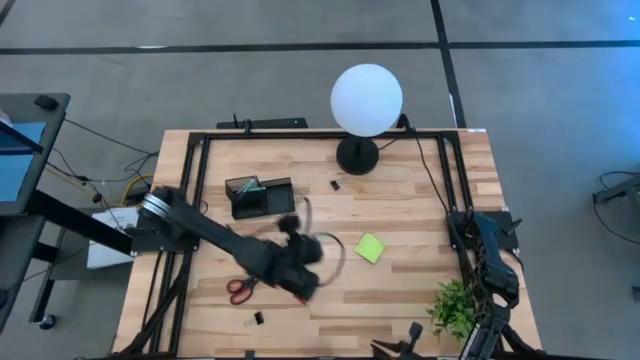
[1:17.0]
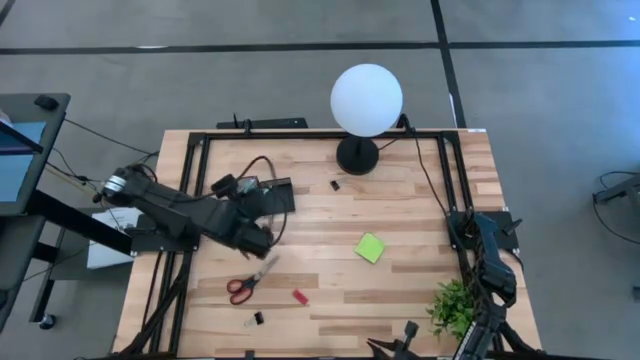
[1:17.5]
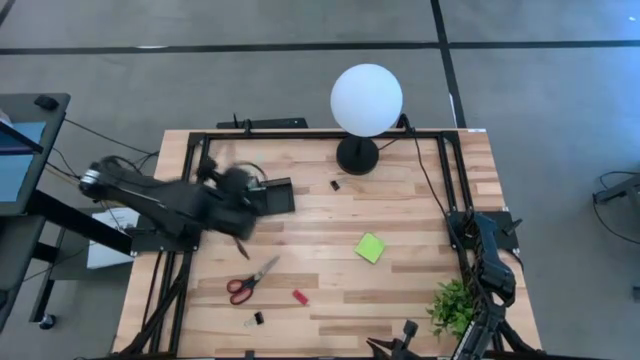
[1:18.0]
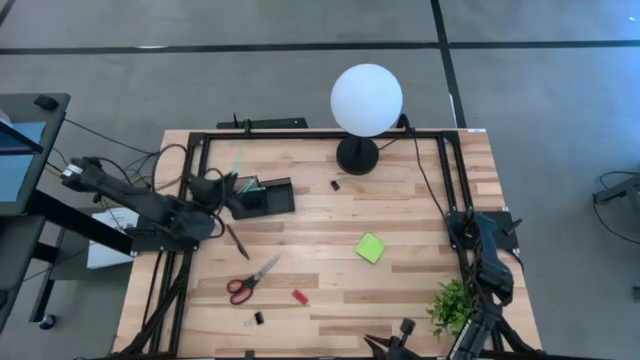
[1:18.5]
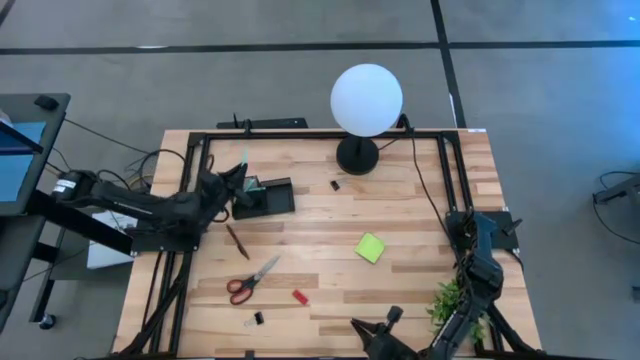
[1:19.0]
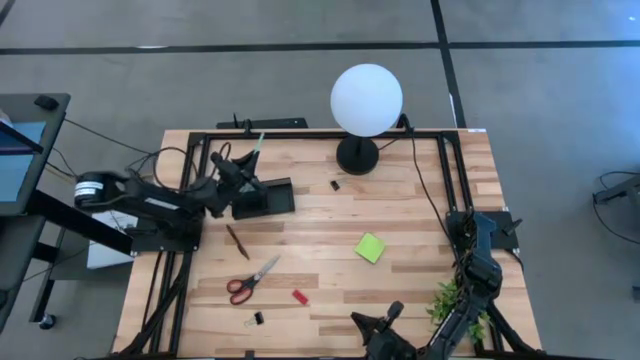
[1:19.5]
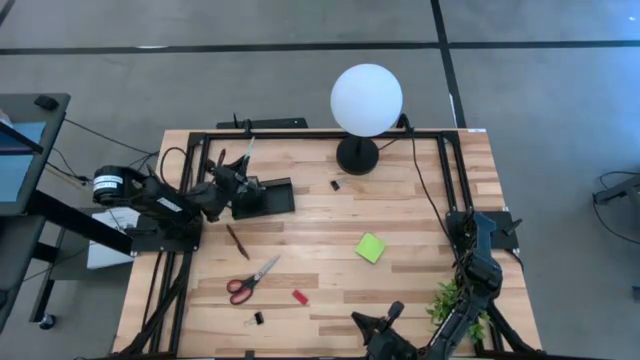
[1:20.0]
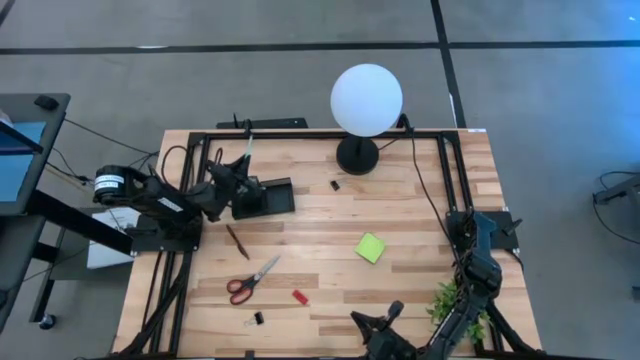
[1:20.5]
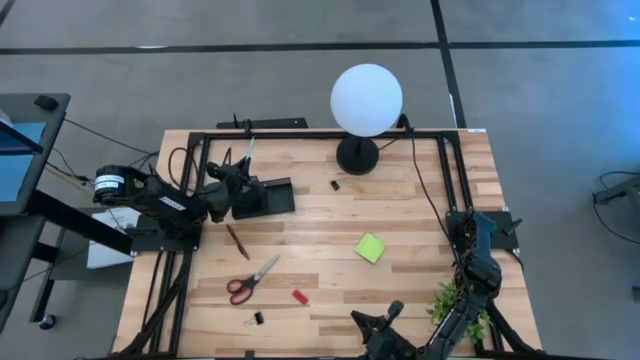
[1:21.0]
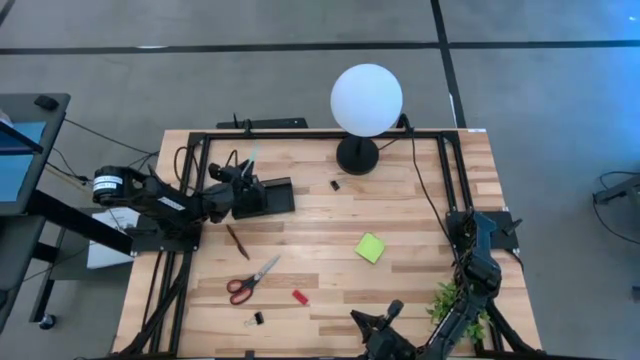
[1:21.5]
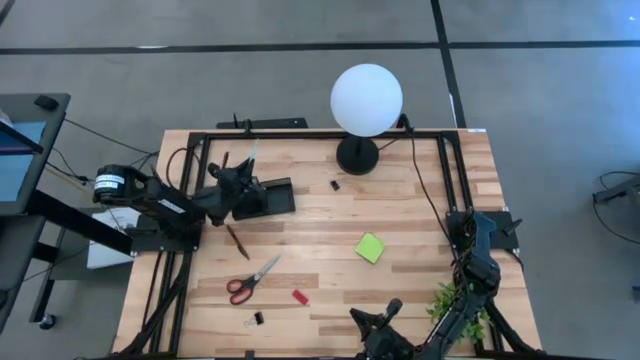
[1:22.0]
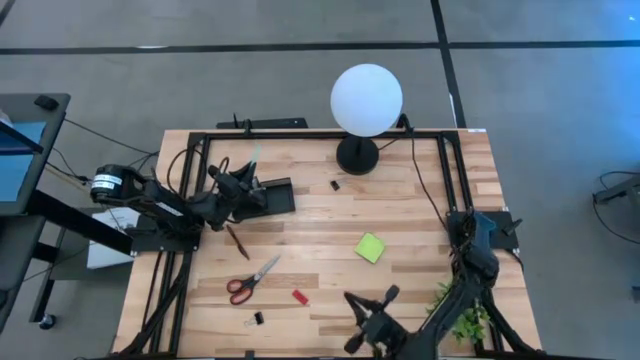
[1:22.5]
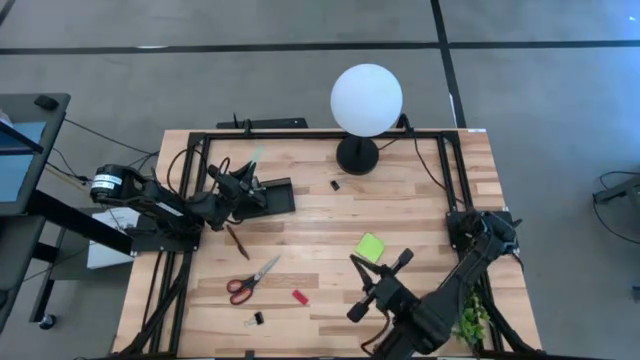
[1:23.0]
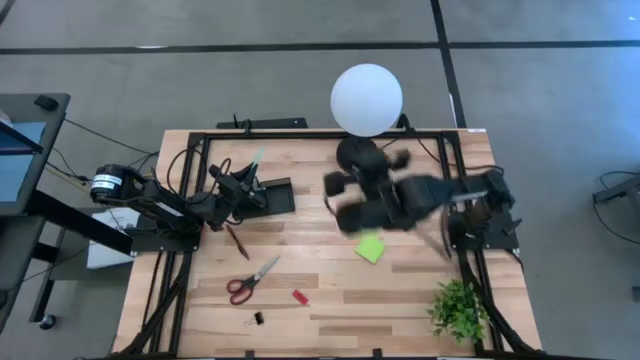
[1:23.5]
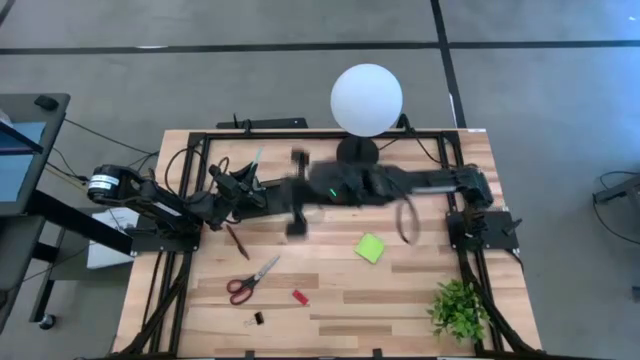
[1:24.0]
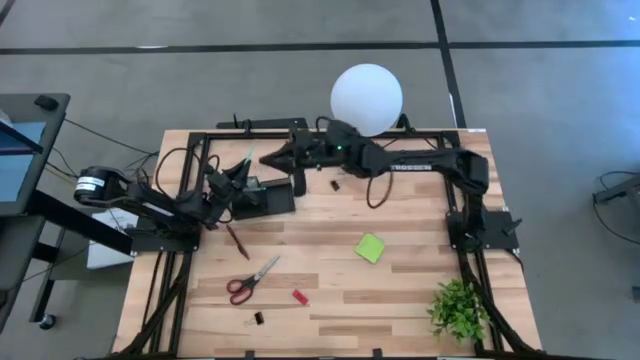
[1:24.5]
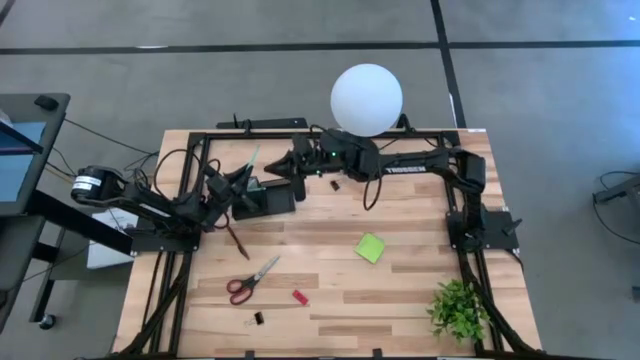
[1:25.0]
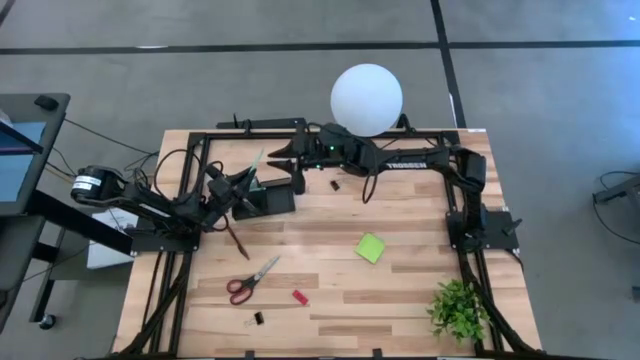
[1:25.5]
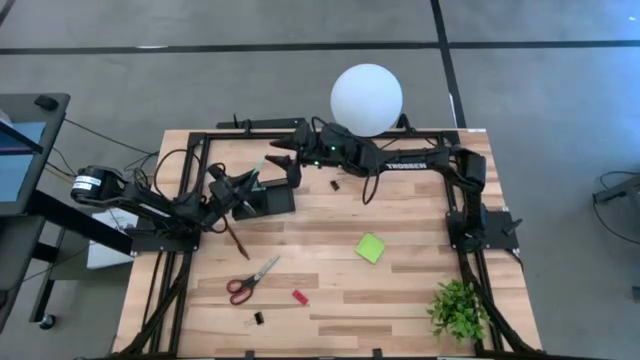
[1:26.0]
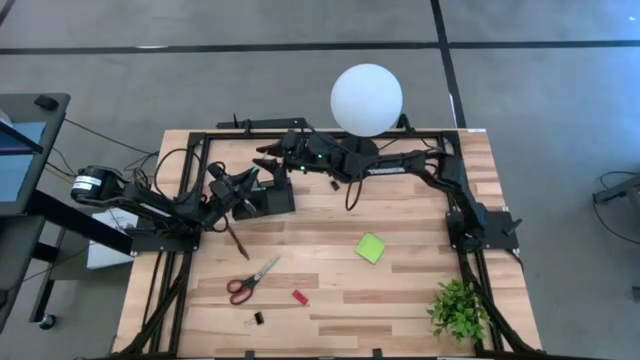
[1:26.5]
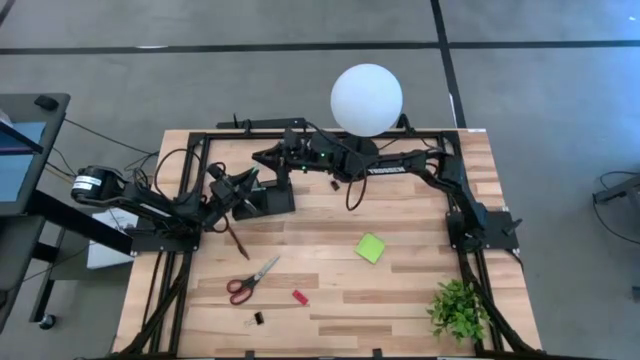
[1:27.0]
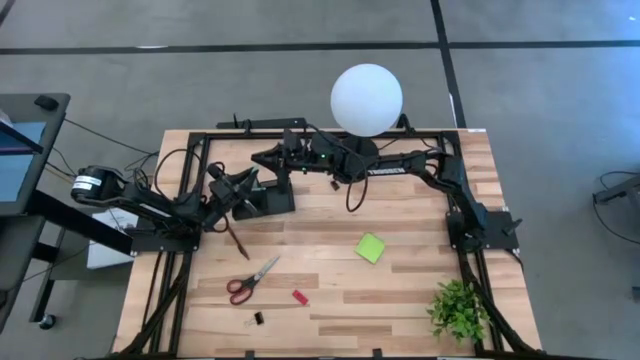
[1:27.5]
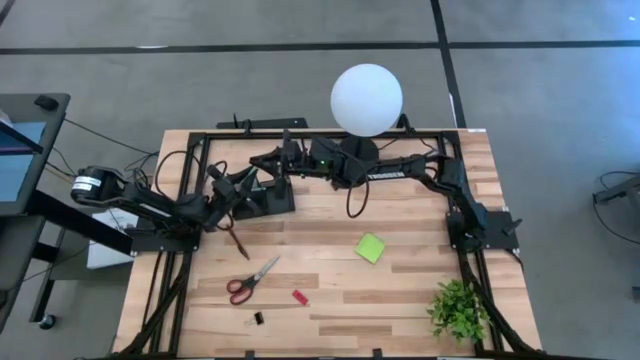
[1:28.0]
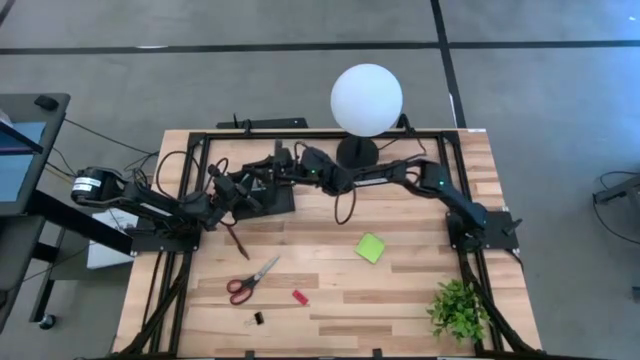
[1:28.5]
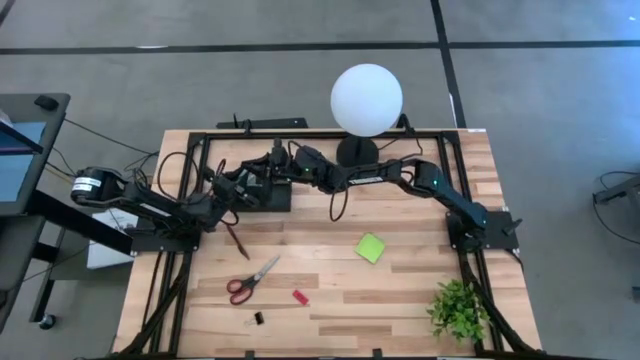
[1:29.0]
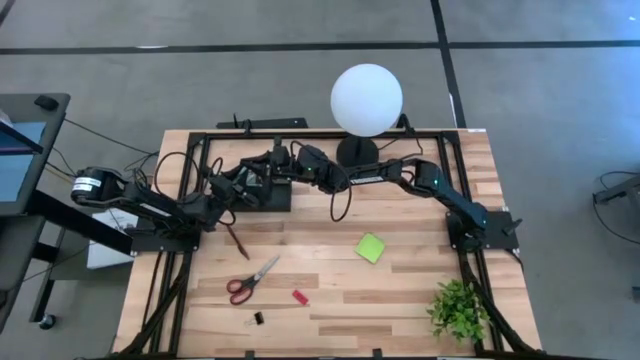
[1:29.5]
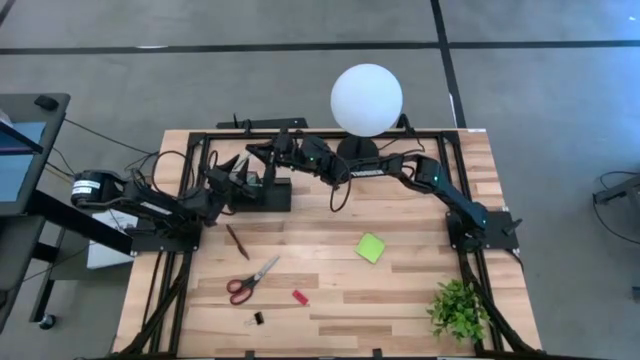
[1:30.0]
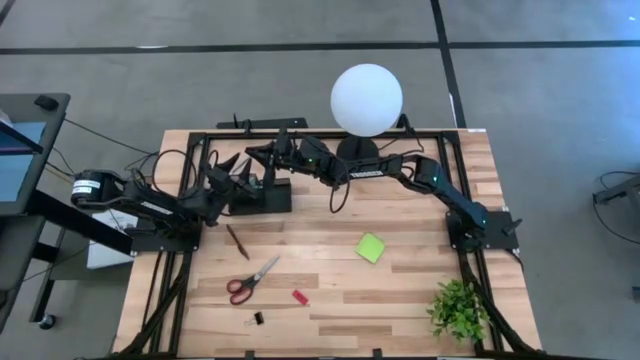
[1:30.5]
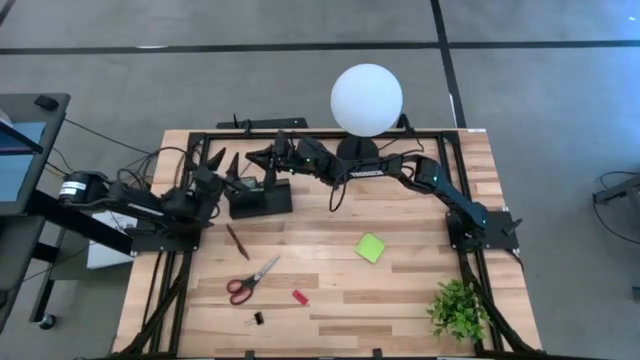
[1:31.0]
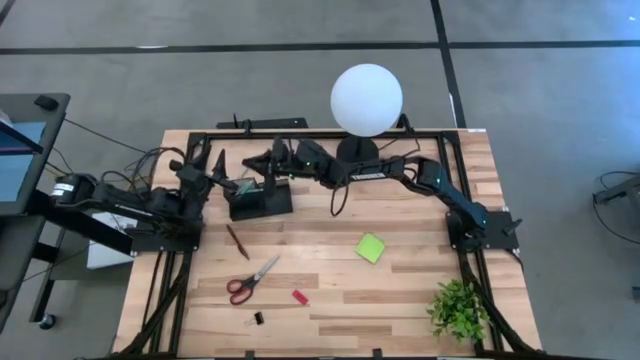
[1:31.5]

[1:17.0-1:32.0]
Task: Pick and place office supplies into organizer
Put the blue pencil into the black desk organizer

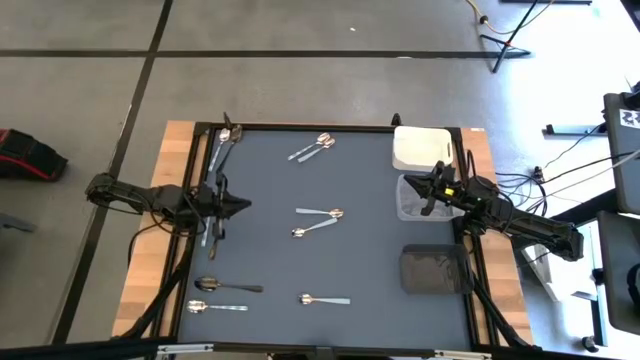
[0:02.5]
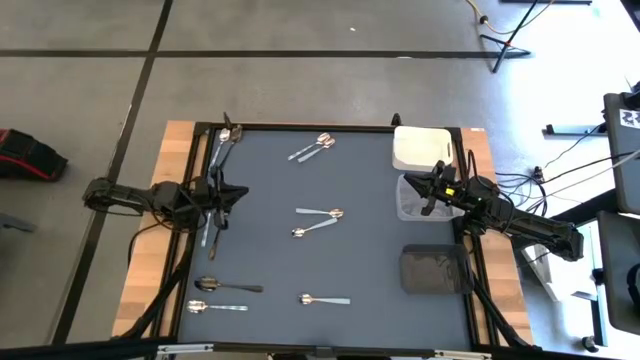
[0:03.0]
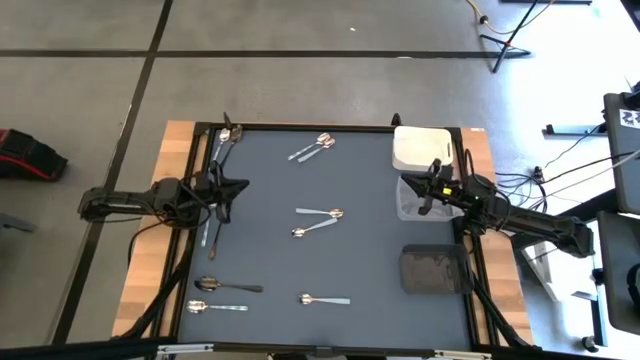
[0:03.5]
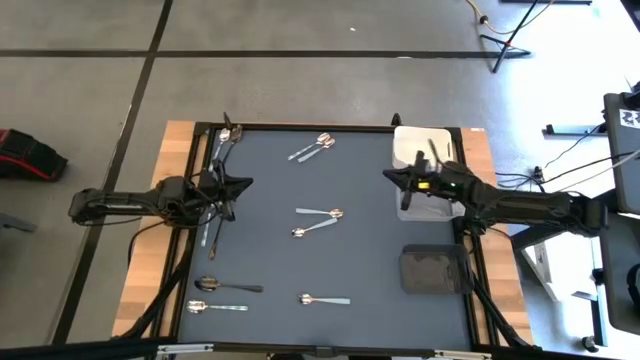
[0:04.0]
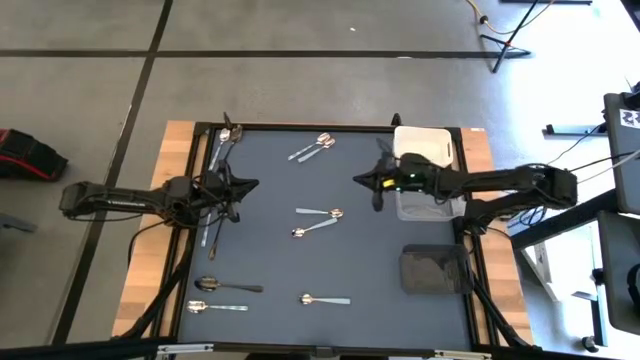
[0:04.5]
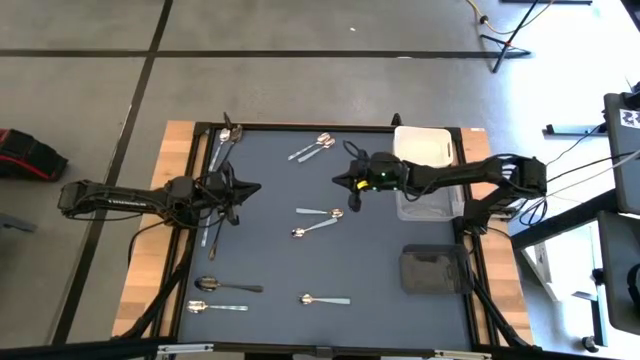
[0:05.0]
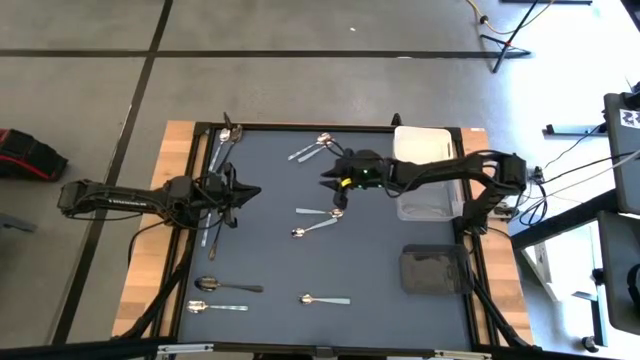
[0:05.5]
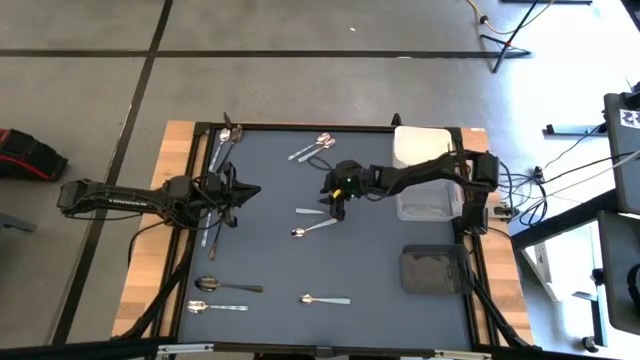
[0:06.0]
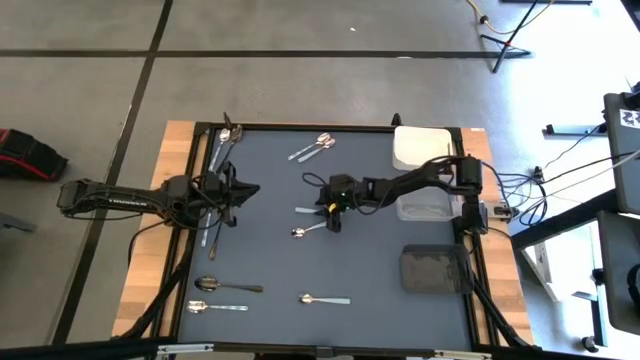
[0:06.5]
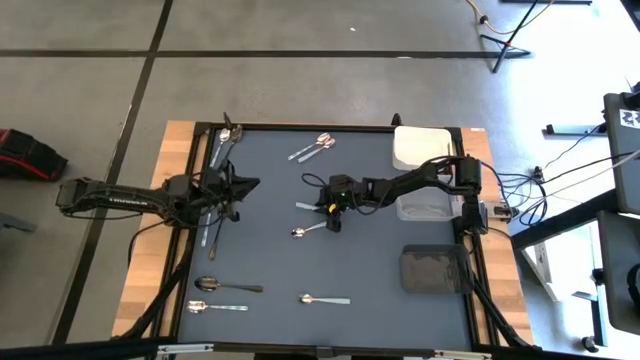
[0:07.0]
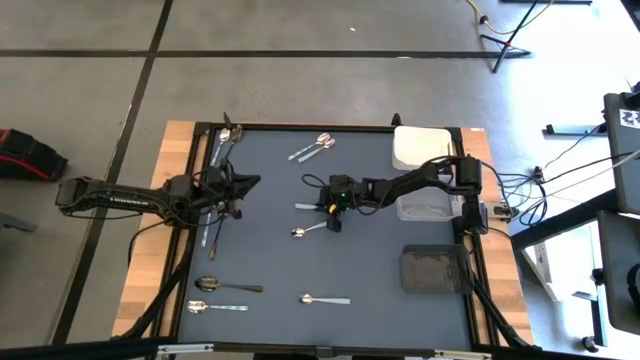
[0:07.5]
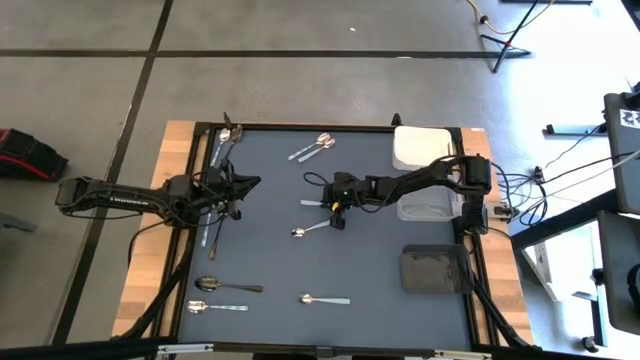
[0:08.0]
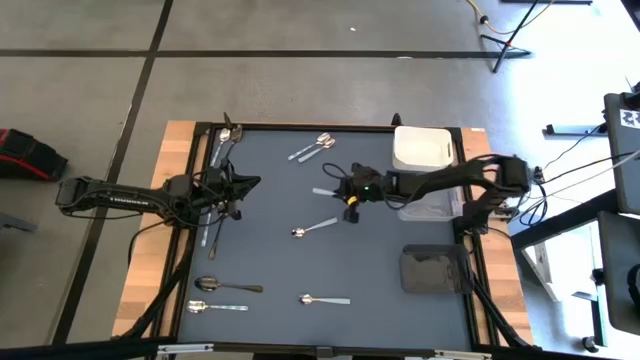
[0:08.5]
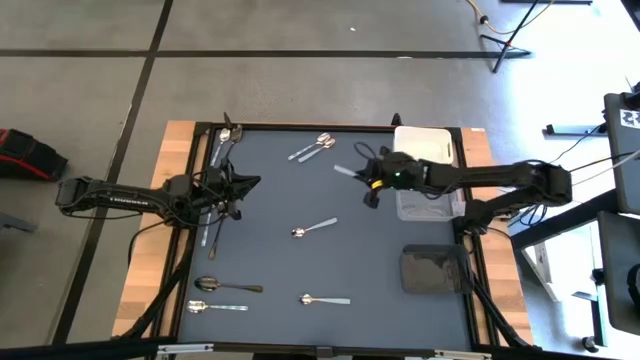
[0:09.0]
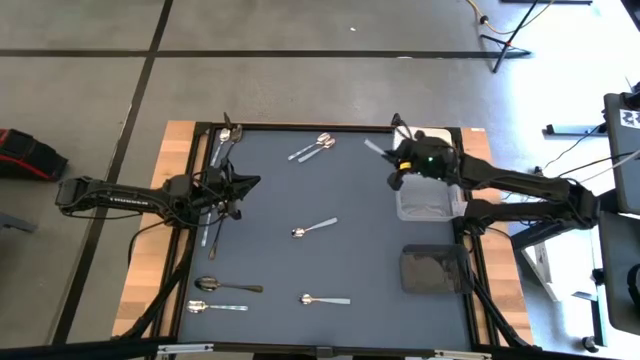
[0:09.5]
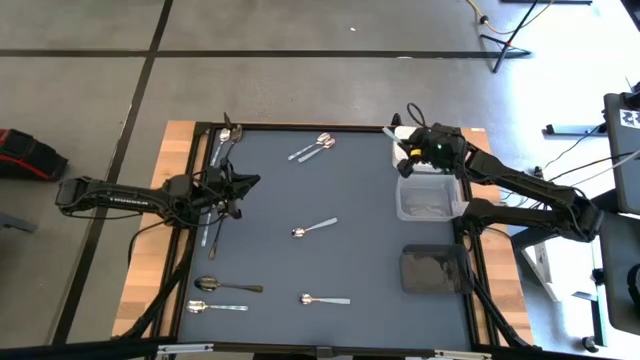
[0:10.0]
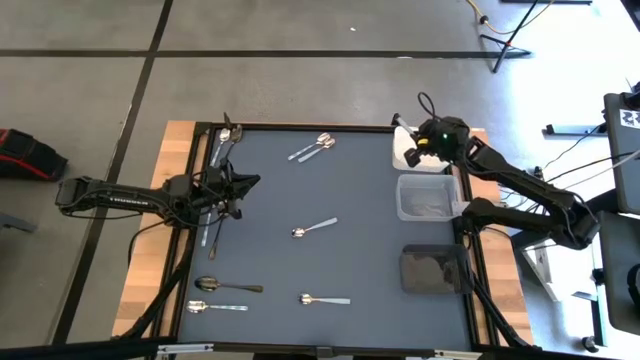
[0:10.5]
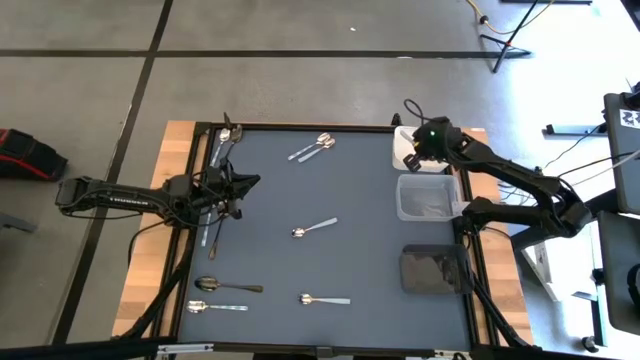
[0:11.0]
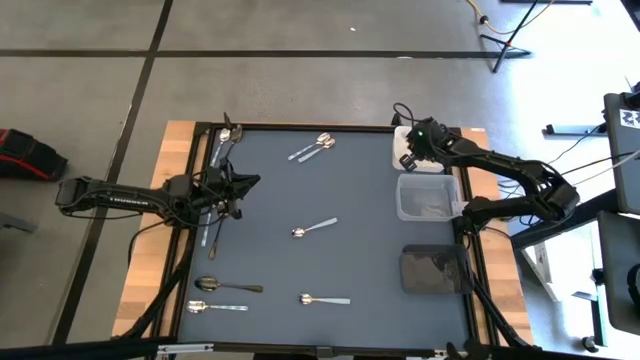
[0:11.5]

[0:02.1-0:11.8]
Task: Sort silverware by color (type)
Put the light blue spoon into the white bin
